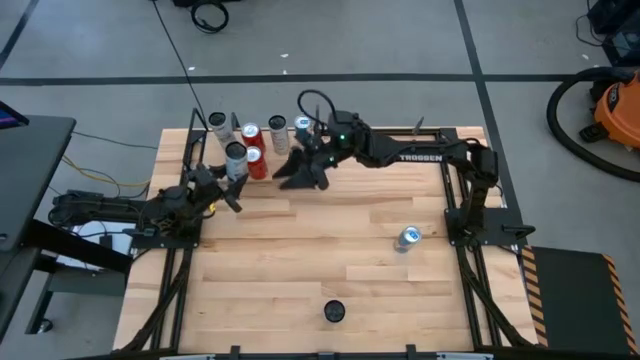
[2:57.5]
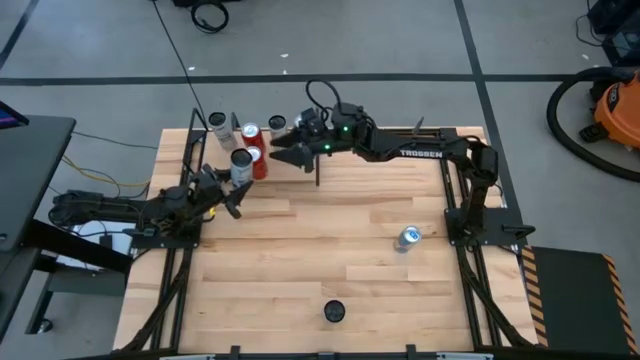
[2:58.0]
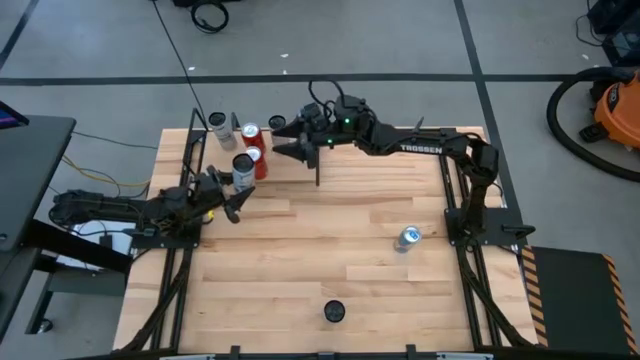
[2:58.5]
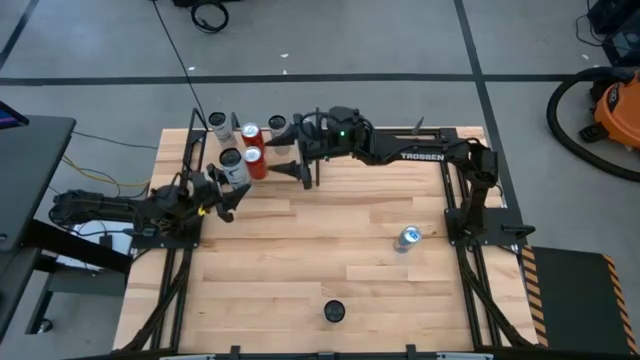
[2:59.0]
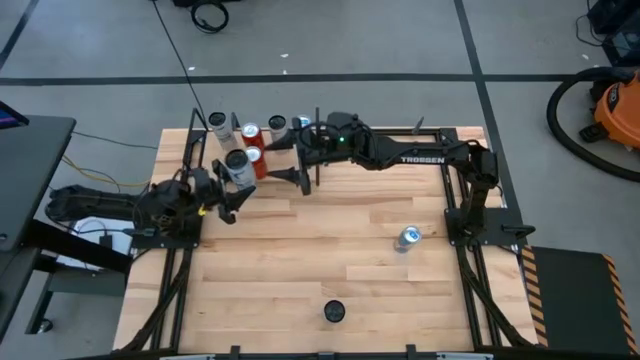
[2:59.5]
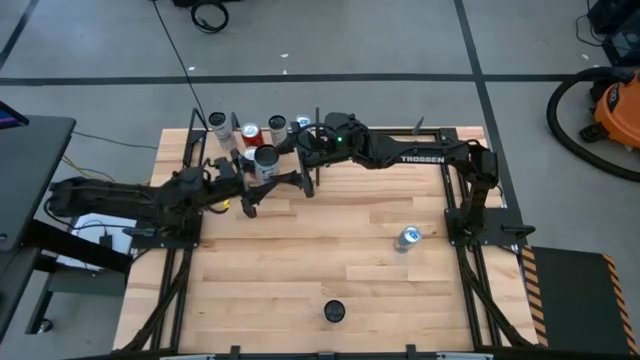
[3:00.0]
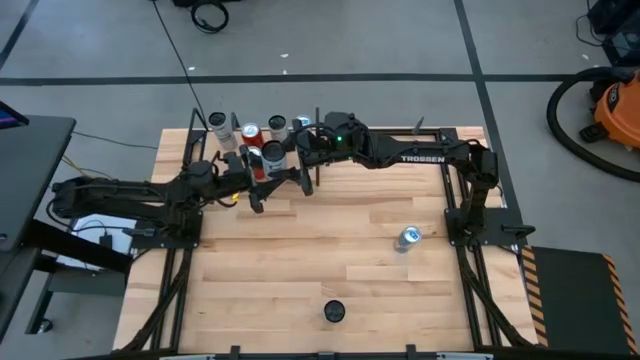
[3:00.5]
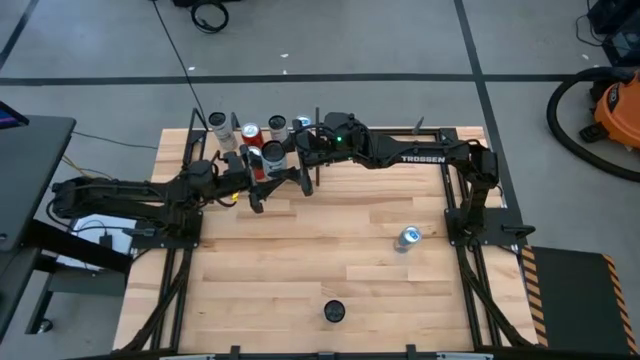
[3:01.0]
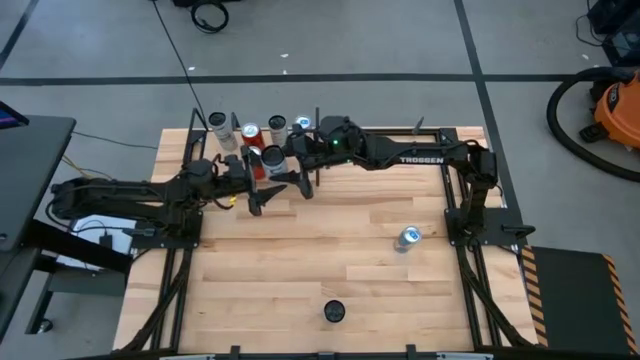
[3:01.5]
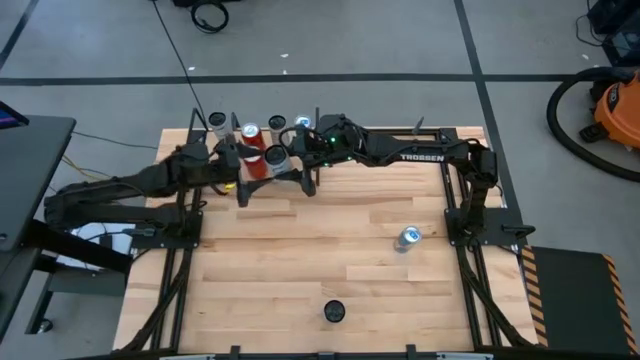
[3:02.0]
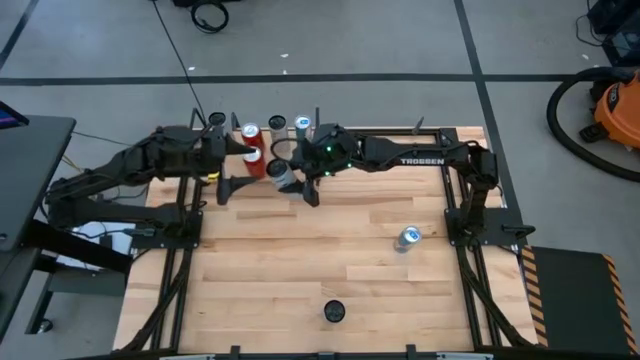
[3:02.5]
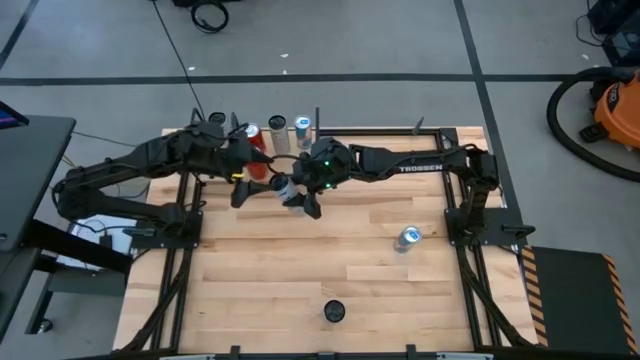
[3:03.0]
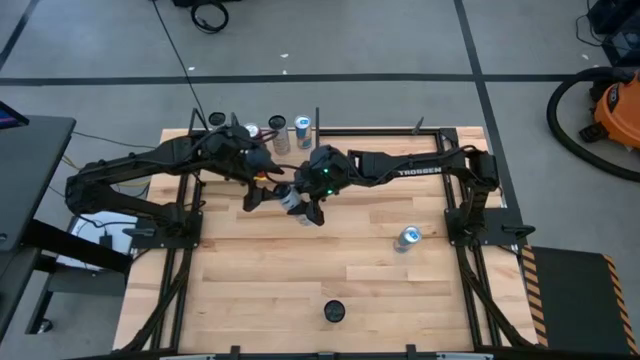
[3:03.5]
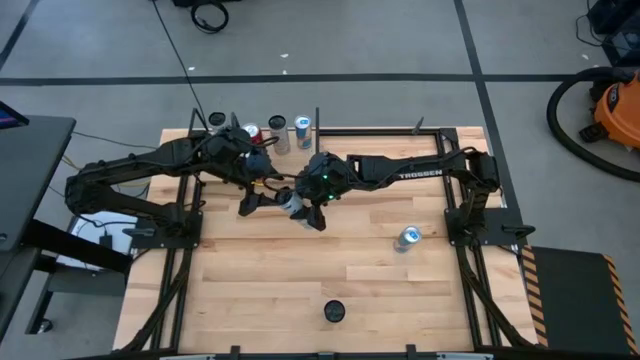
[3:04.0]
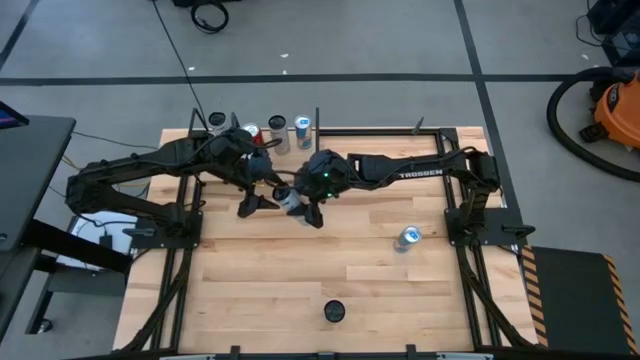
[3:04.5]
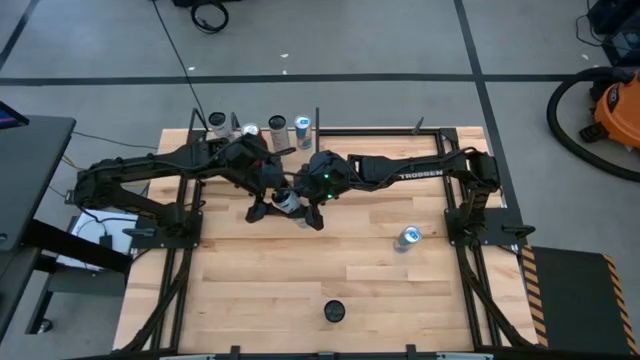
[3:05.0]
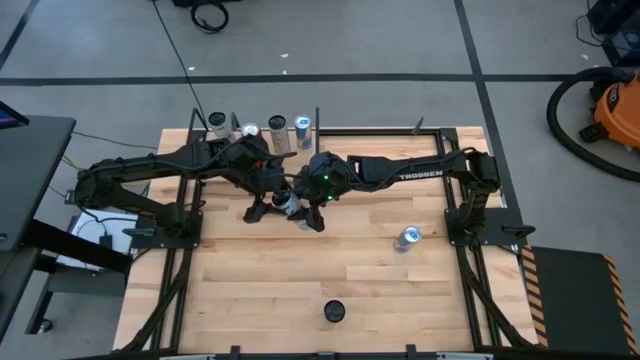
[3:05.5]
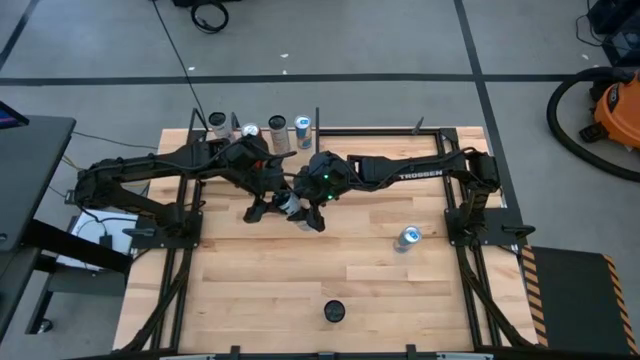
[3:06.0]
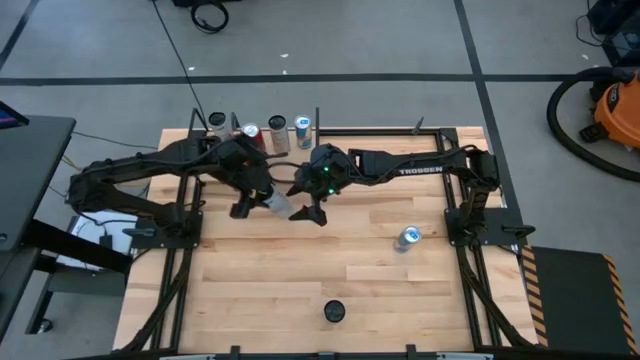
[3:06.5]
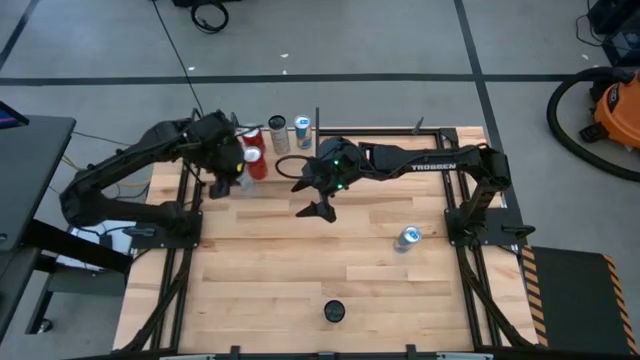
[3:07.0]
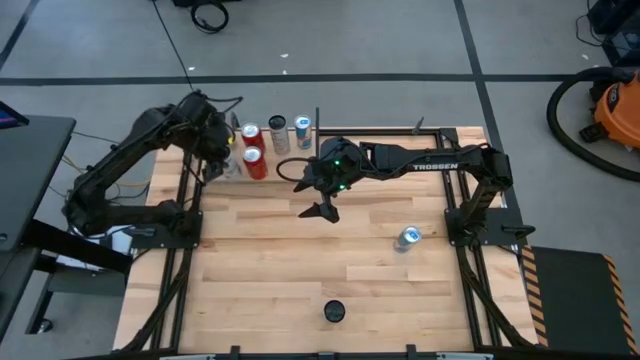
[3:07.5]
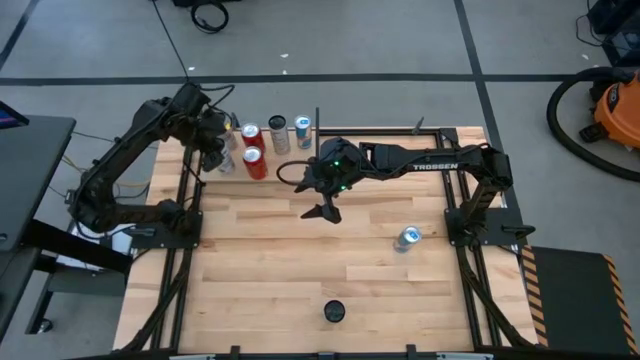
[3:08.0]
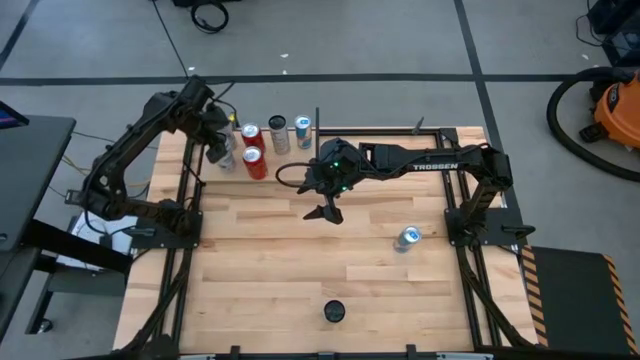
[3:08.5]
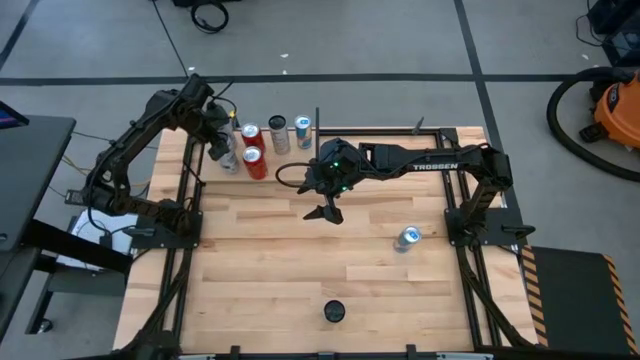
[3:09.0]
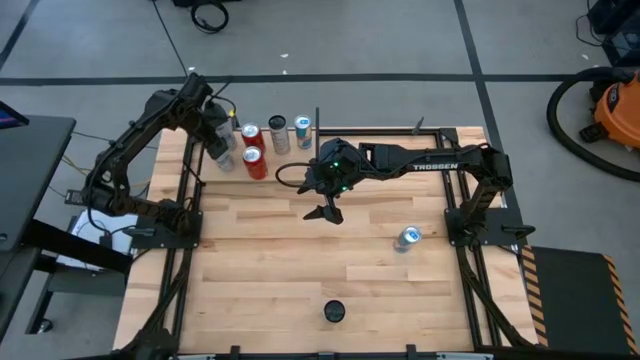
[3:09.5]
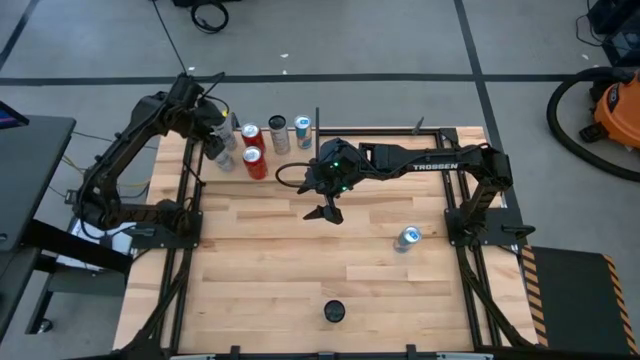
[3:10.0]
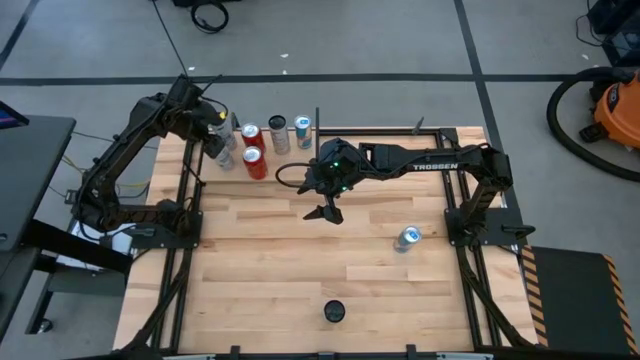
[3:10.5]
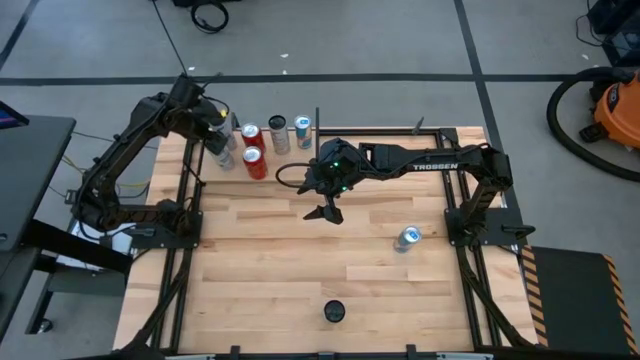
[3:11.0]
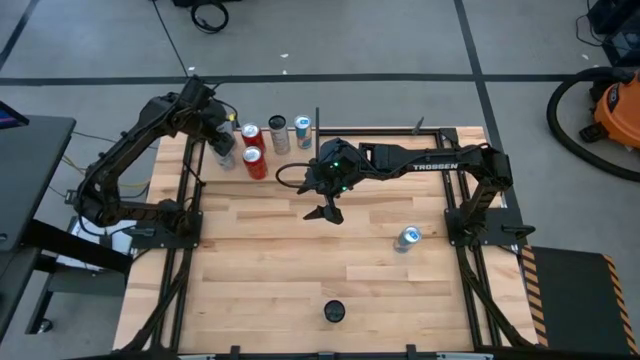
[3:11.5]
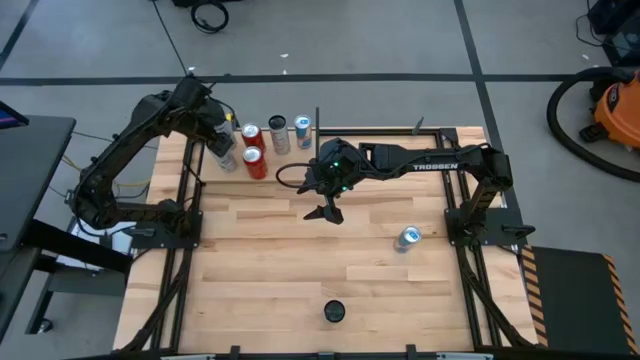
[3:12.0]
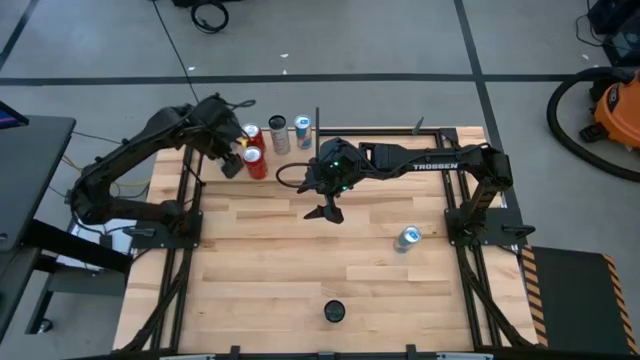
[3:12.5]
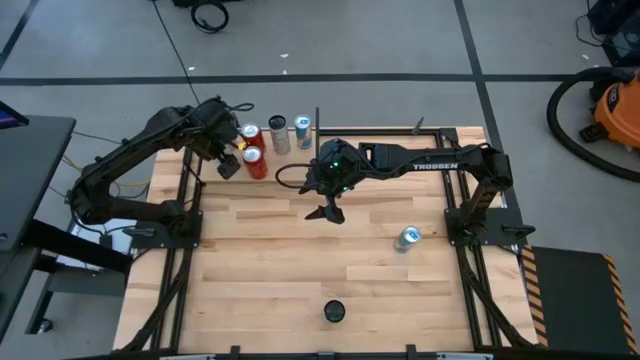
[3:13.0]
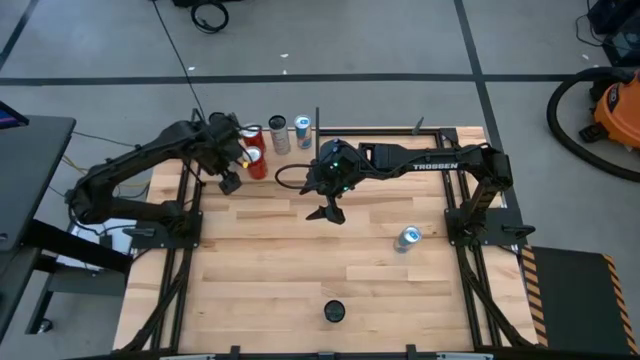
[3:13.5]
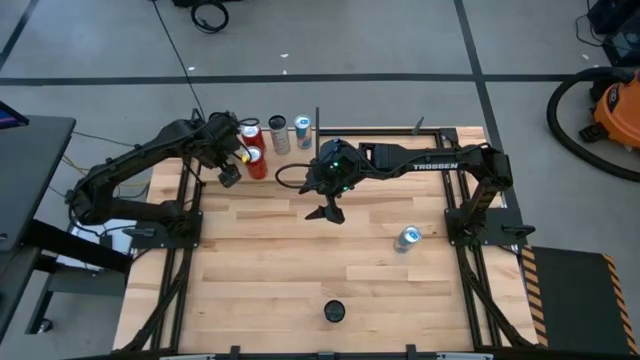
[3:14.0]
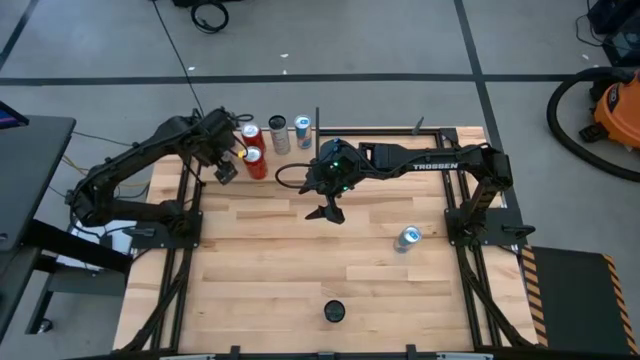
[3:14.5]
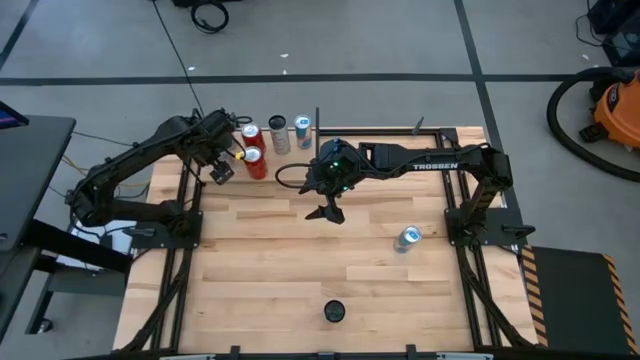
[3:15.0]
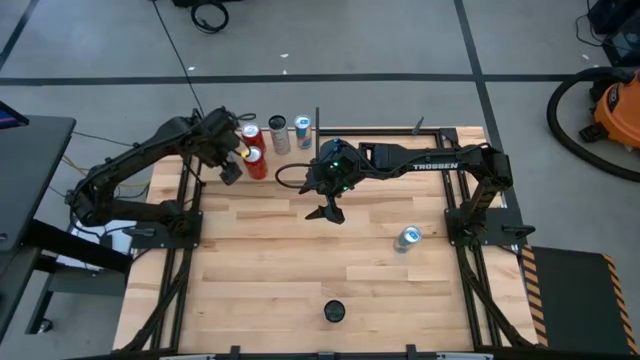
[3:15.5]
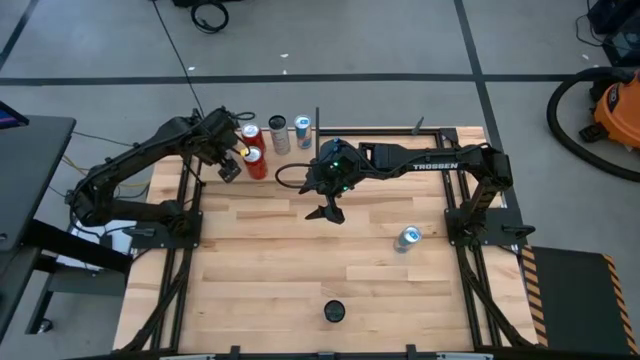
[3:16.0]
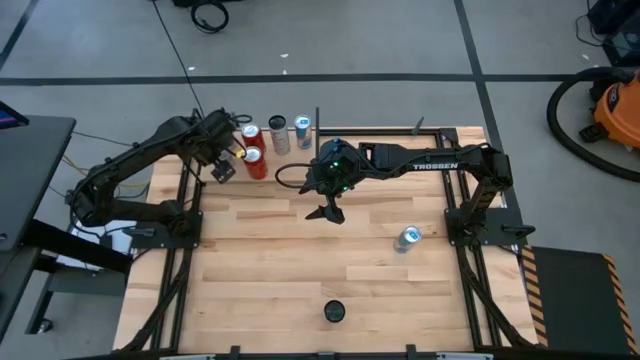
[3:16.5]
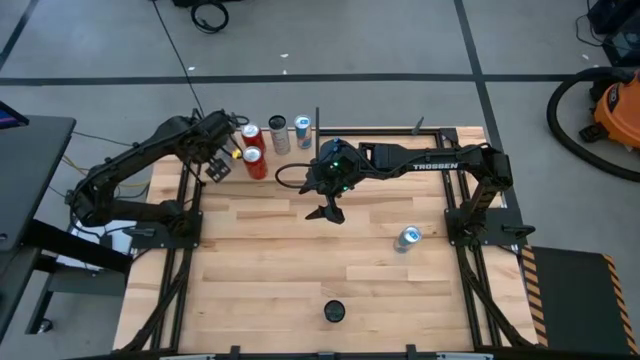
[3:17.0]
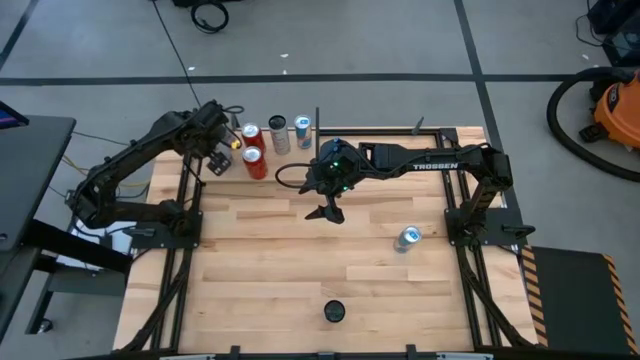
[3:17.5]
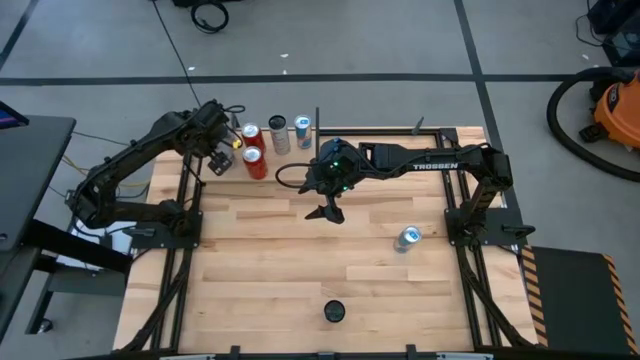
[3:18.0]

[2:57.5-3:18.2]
Task: Place canned beverage on shelf
Put the blue-white soda can on the shelf aligned with the other blue-white soda can
